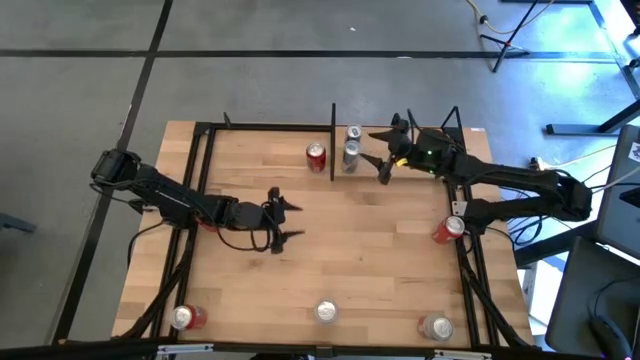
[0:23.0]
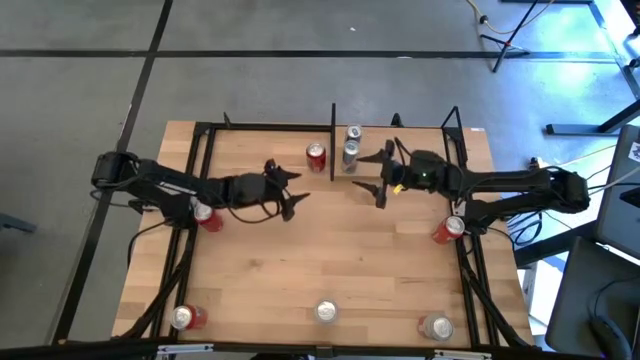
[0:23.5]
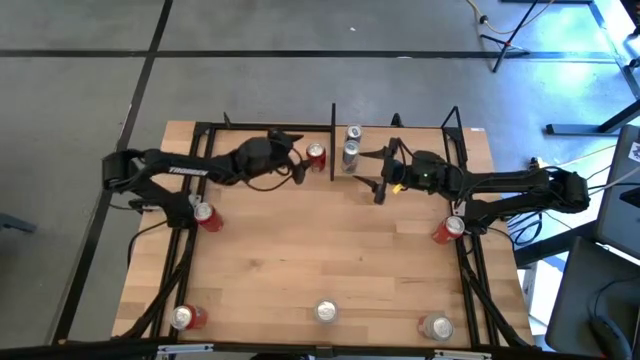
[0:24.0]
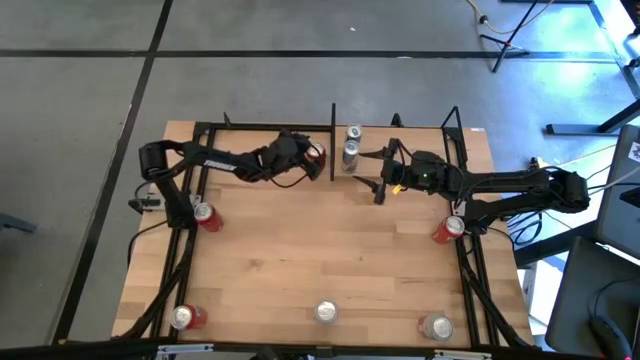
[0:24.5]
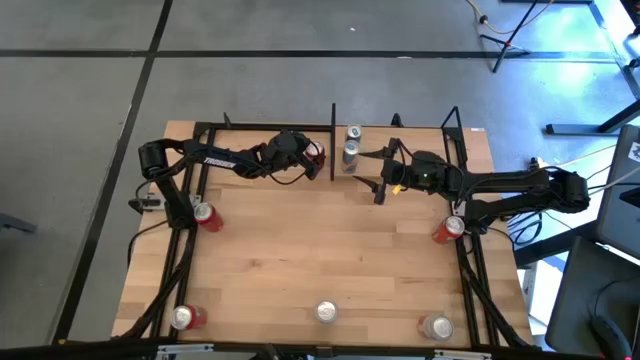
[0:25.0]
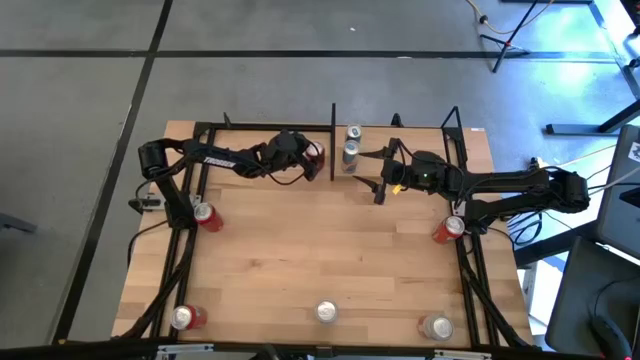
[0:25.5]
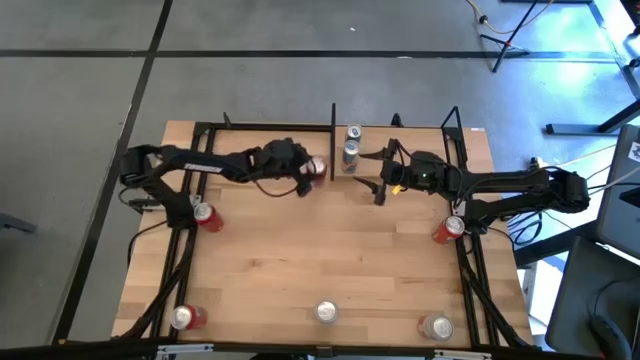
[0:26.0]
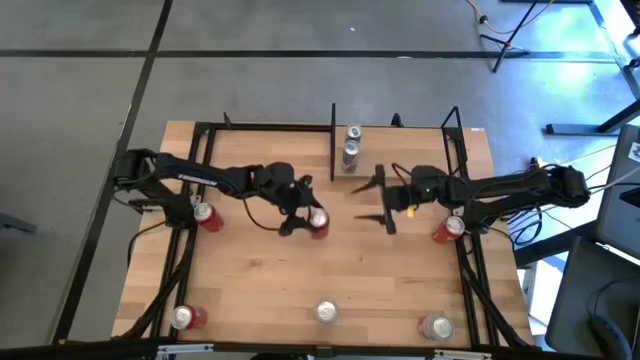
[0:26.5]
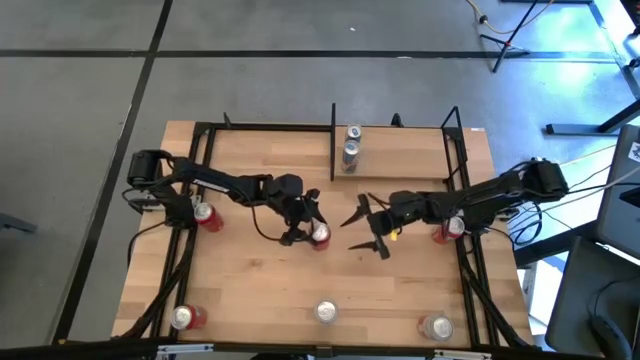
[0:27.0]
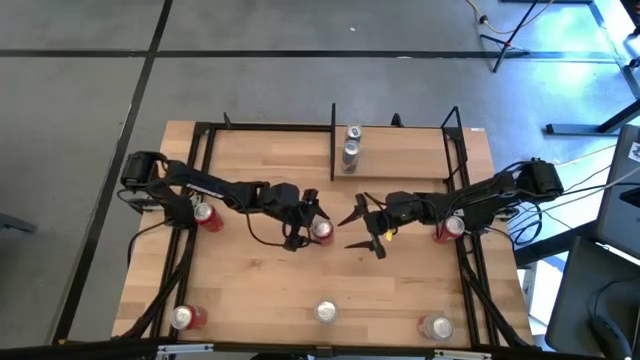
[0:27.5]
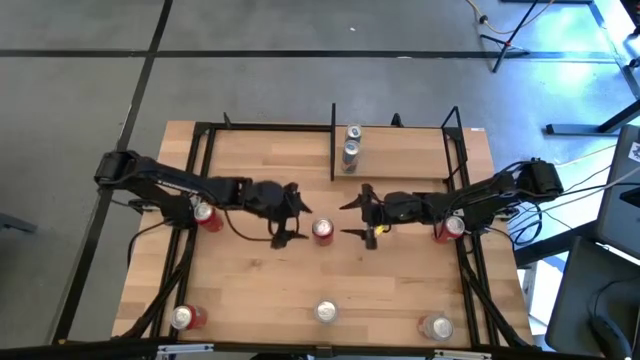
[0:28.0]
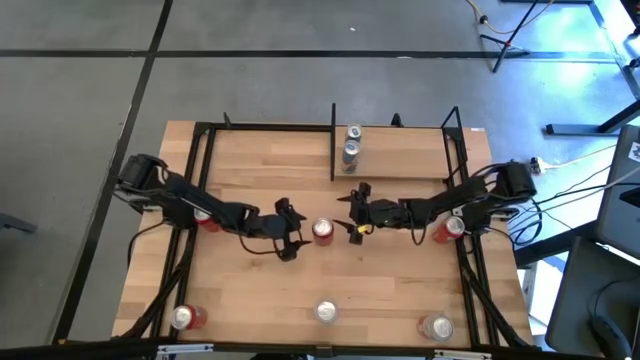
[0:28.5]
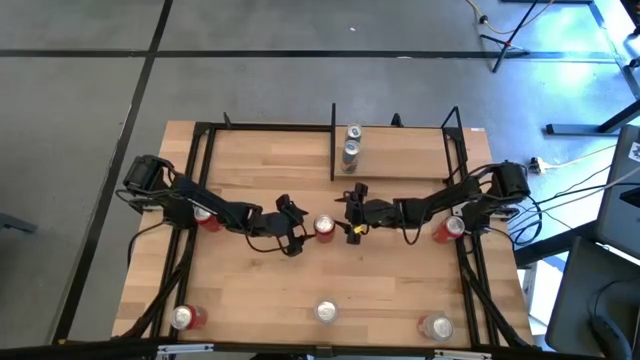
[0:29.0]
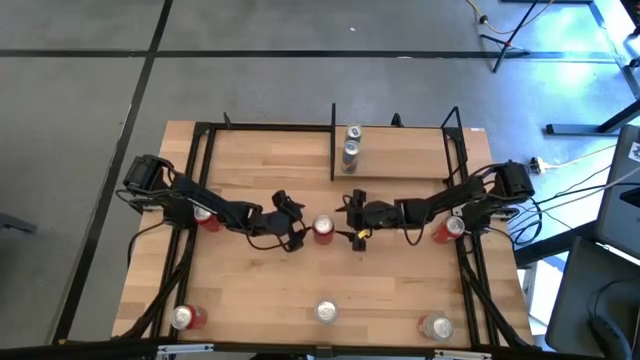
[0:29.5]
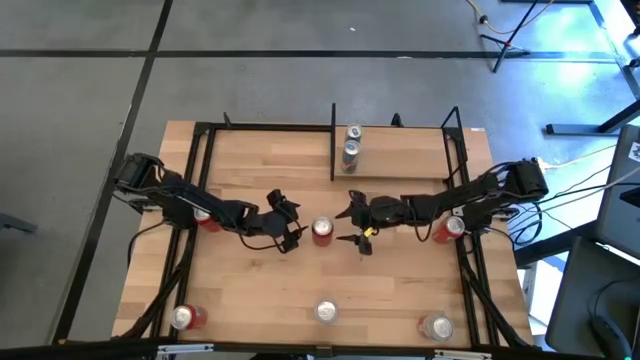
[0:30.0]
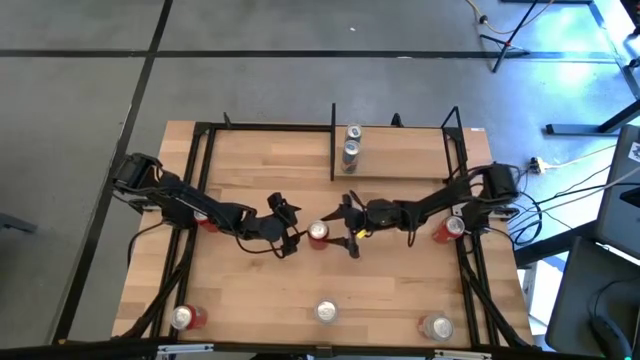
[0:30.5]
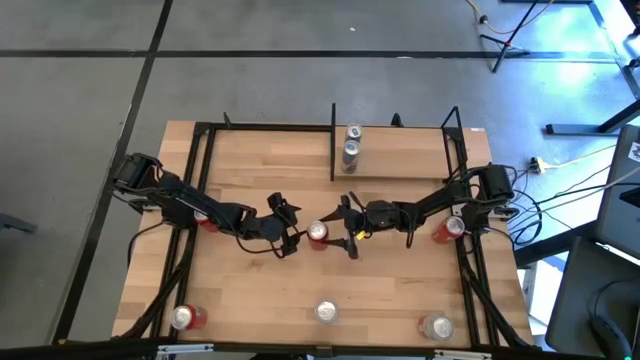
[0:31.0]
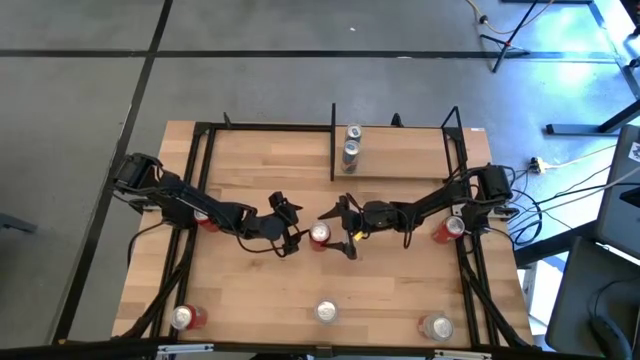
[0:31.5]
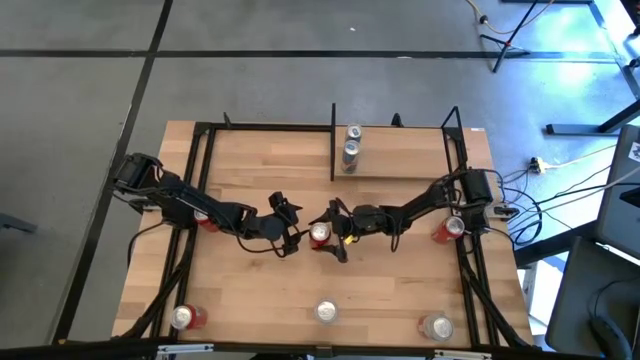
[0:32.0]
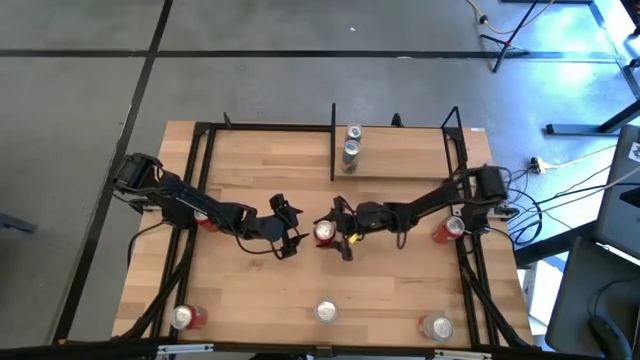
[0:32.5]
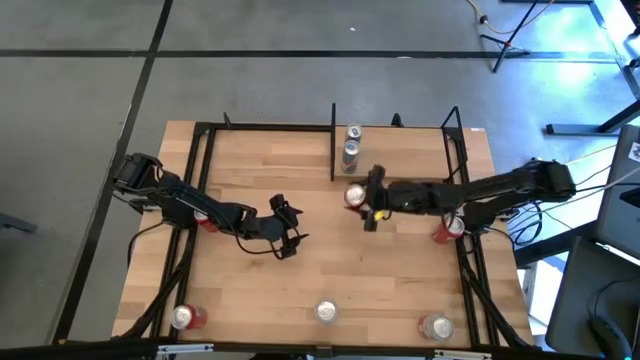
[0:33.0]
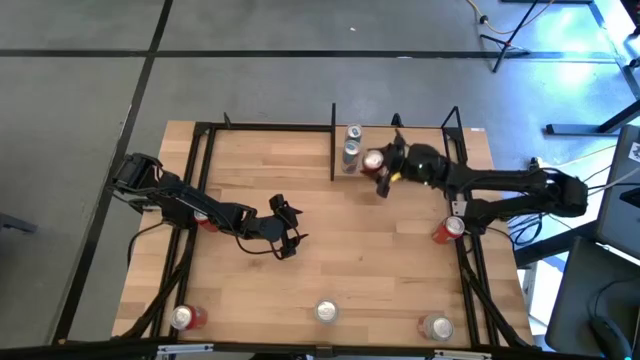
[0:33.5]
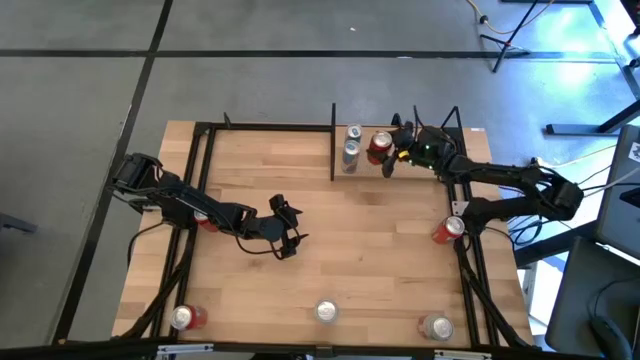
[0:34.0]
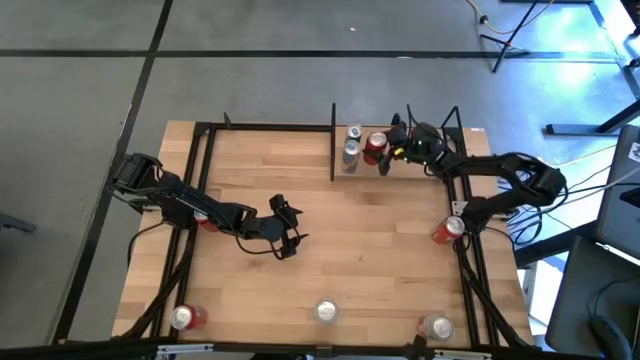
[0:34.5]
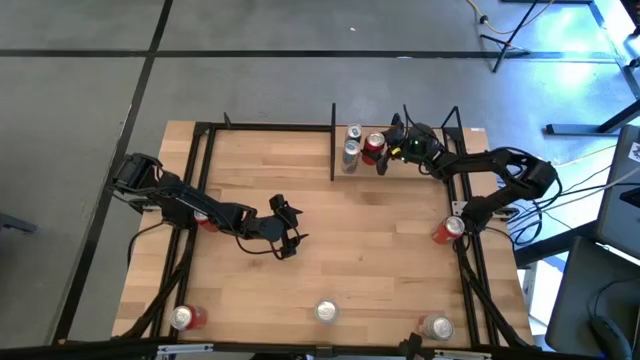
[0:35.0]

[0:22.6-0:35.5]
Task: Place canned beverage on shelf
Put the red black soda can on the shelf

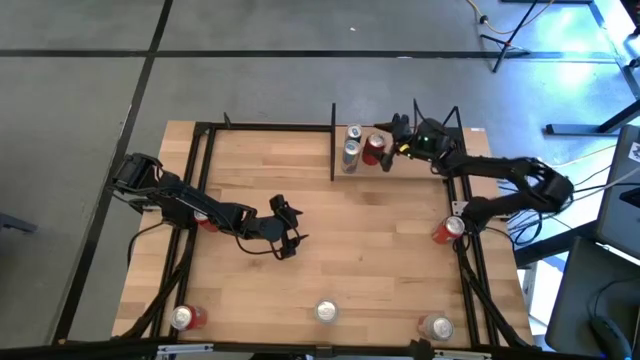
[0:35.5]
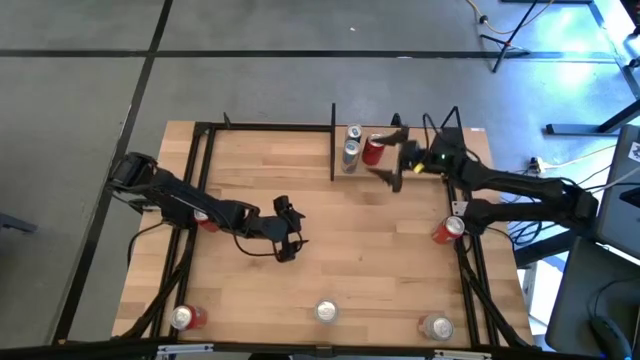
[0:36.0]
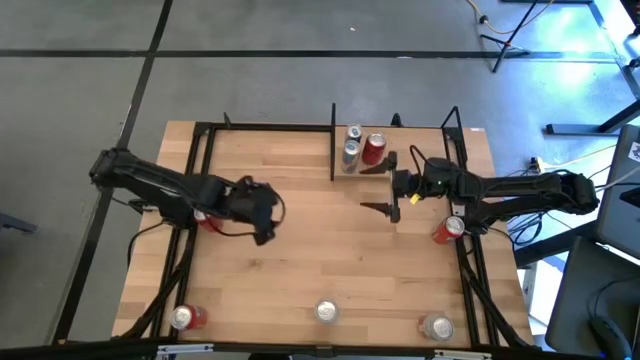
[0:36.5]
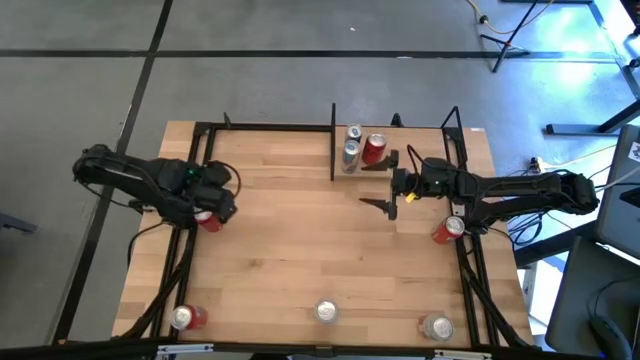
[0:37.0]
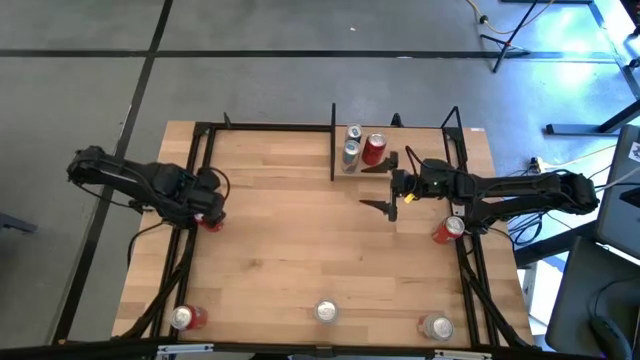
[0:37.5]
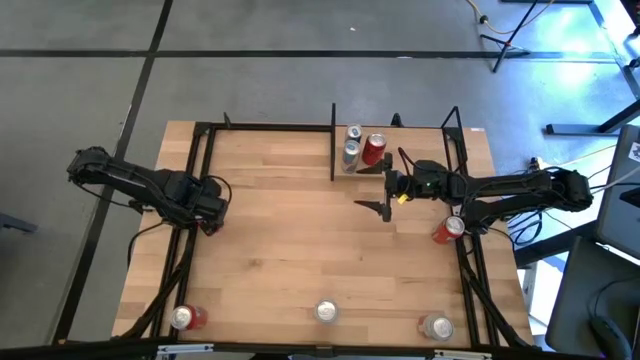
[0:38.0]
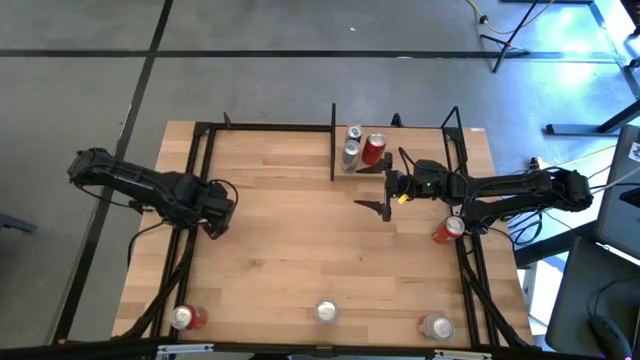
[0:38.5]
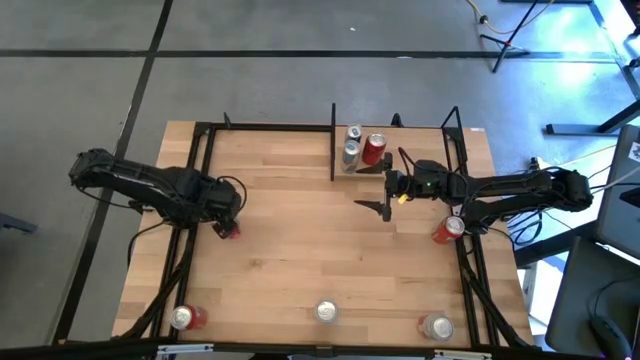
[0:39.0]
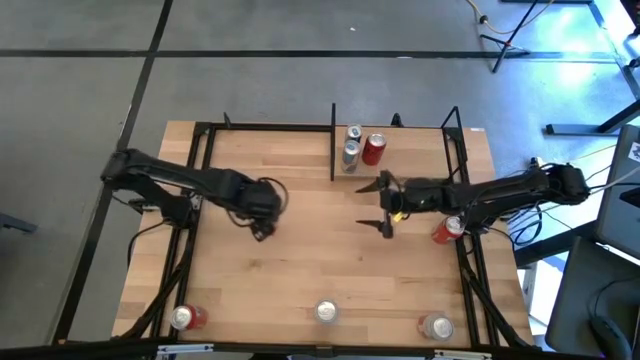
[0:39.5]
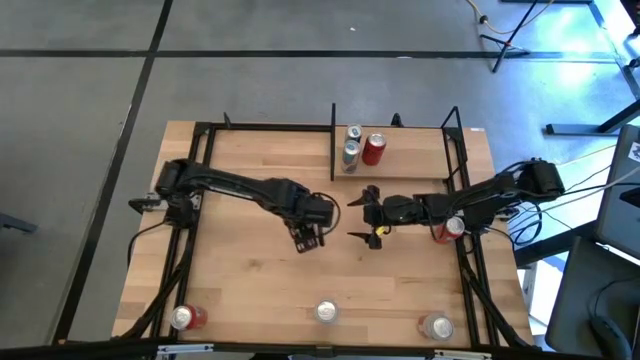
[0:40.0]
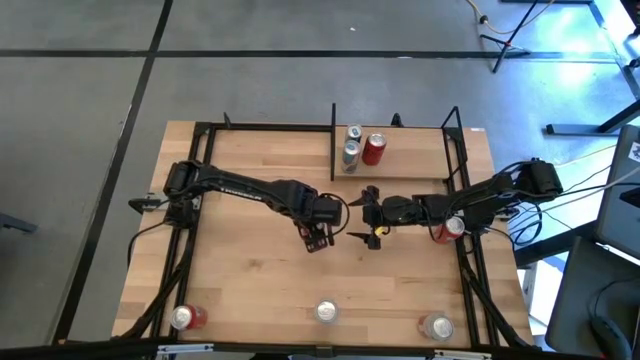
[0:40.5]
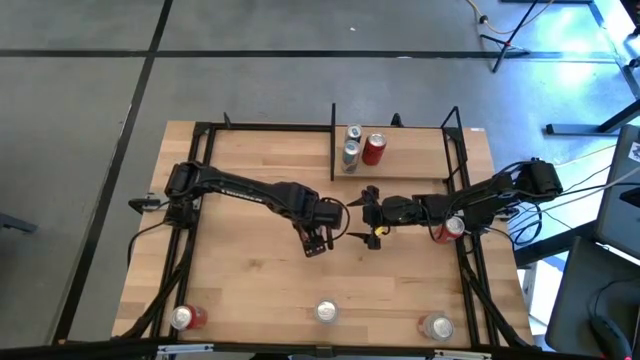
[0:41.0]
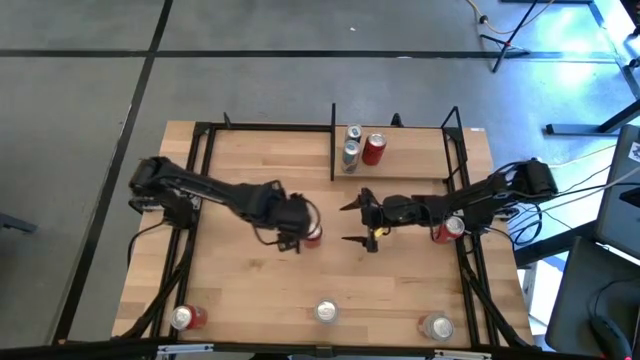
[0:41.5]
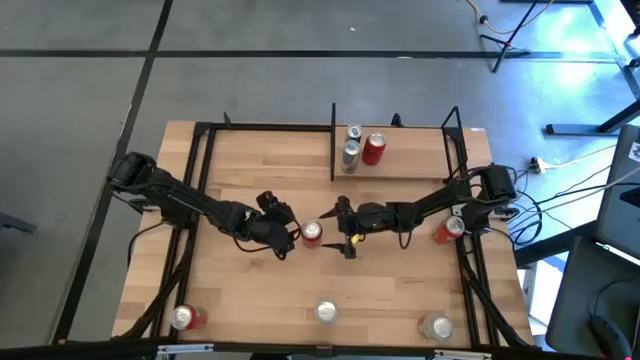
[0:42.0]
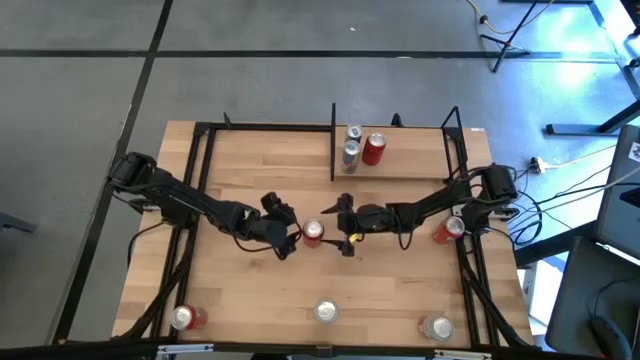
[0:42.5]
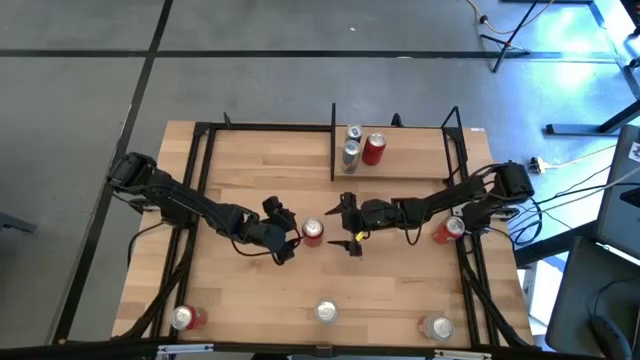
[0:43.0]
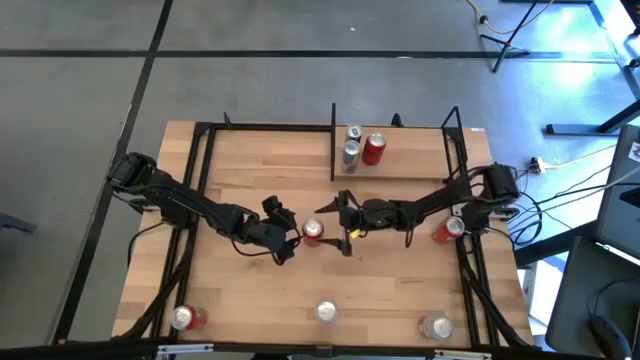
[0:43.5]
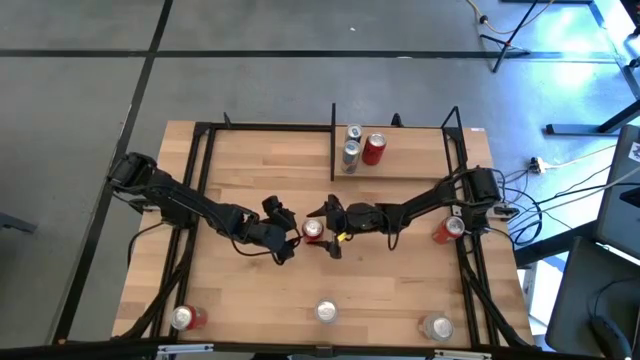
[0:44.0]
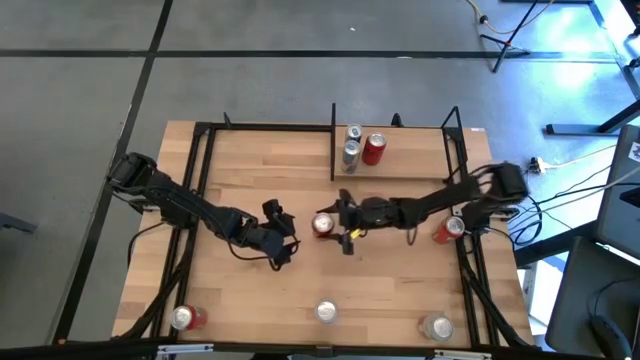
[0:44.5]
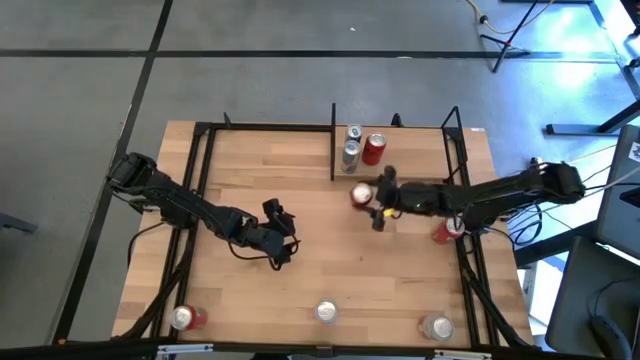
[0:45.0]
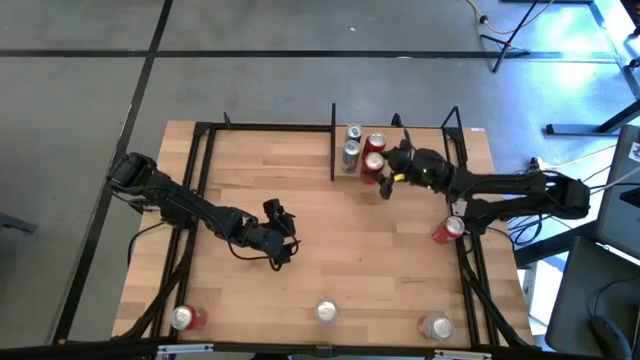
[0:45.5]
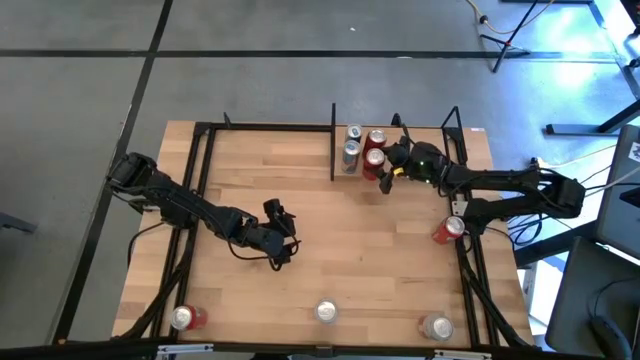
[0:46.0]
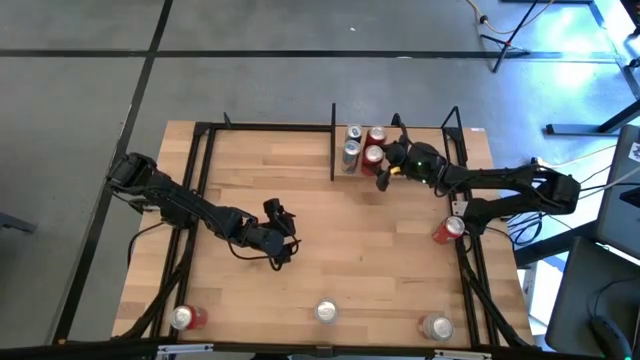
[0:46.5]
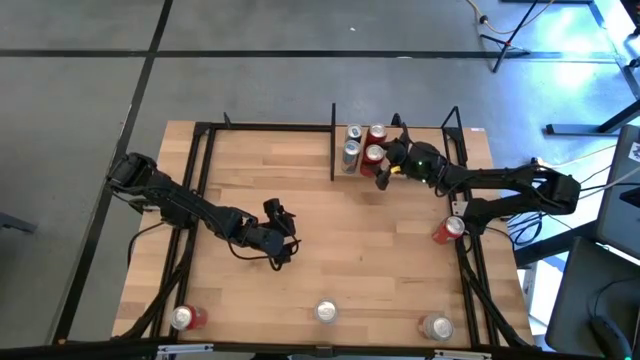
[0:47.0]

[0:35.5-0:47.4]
Put the red black soda can on the shelf aligned with the other red black soda can
